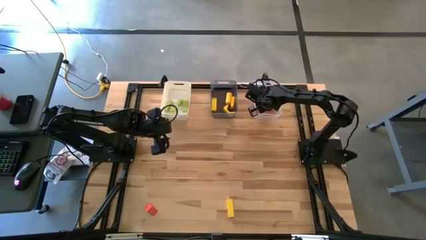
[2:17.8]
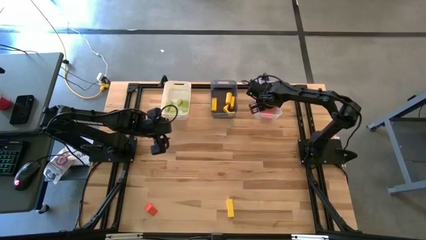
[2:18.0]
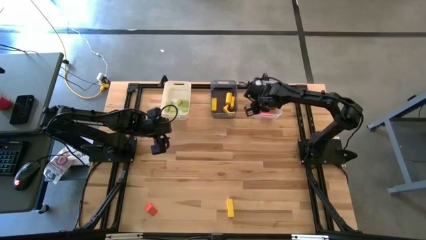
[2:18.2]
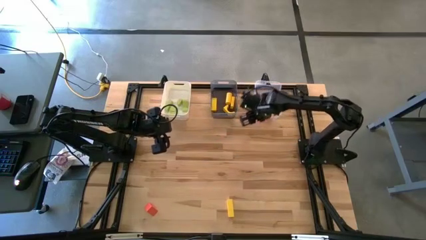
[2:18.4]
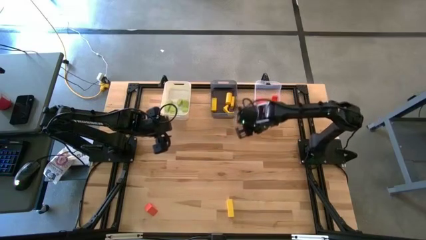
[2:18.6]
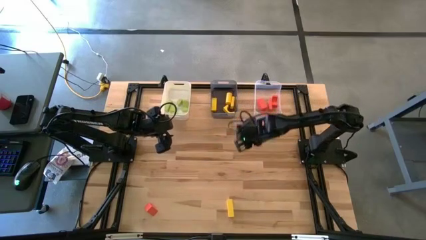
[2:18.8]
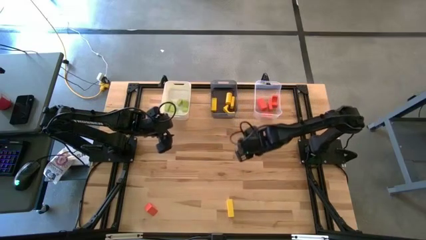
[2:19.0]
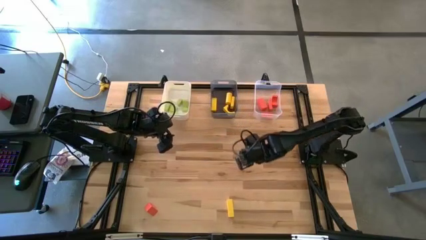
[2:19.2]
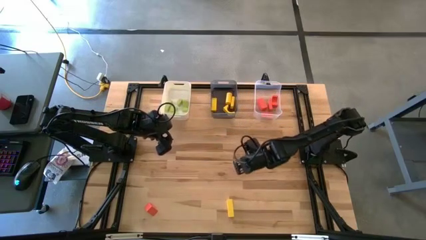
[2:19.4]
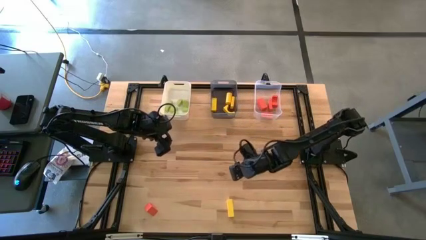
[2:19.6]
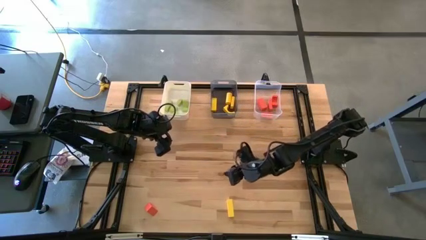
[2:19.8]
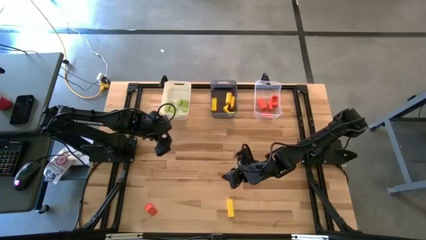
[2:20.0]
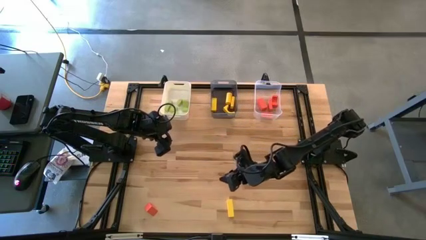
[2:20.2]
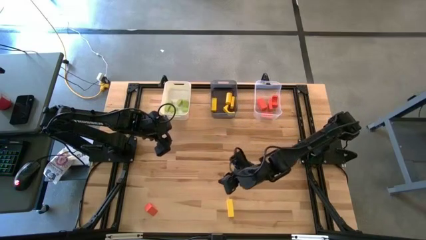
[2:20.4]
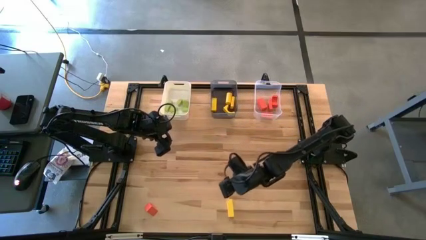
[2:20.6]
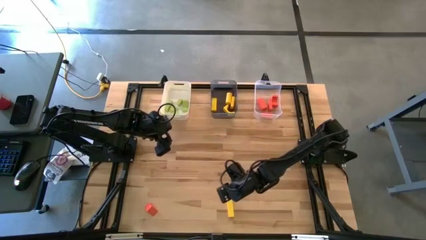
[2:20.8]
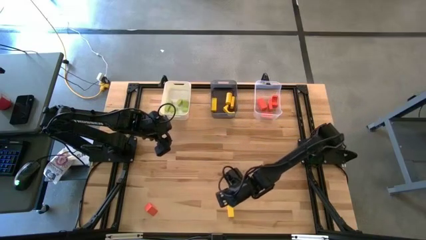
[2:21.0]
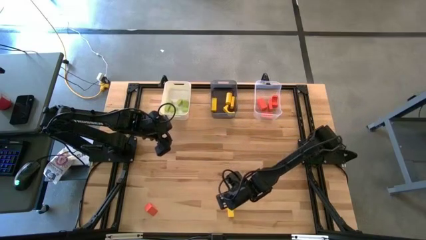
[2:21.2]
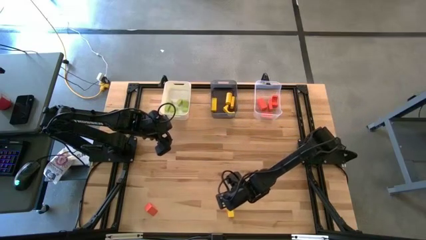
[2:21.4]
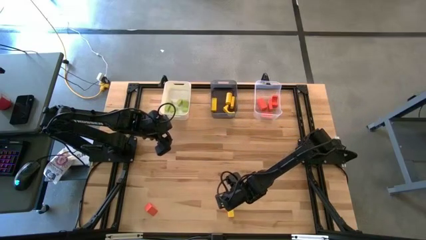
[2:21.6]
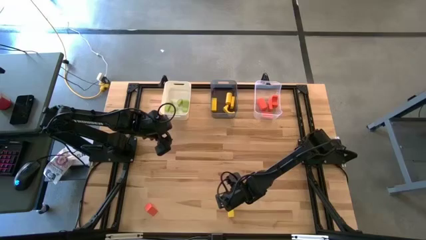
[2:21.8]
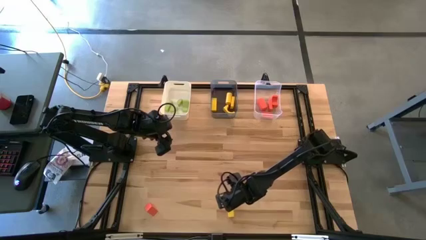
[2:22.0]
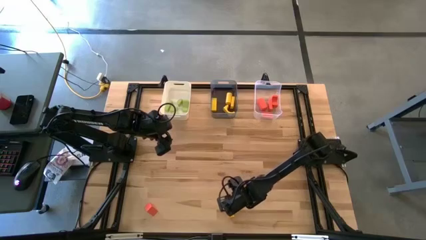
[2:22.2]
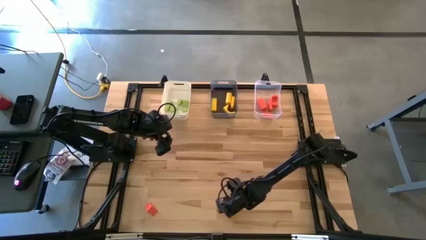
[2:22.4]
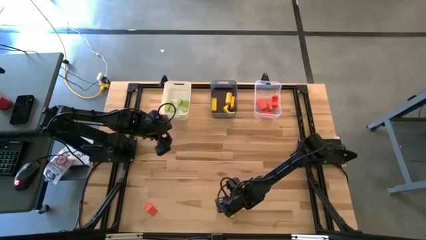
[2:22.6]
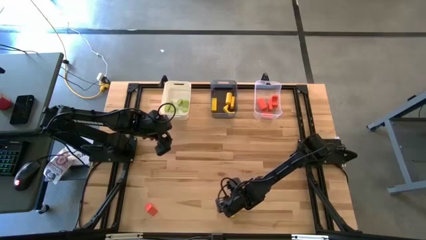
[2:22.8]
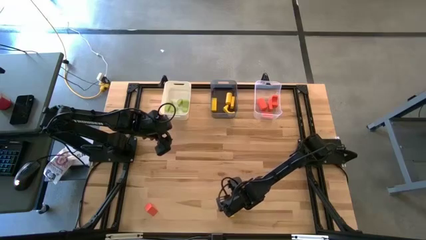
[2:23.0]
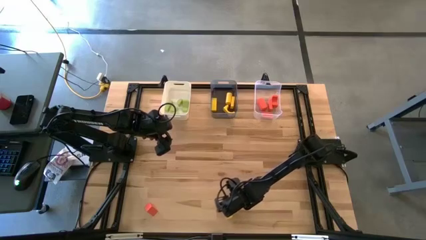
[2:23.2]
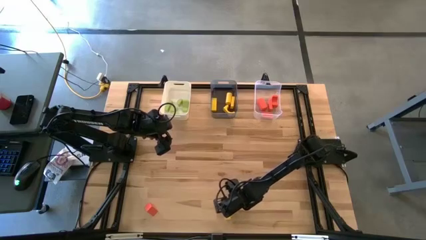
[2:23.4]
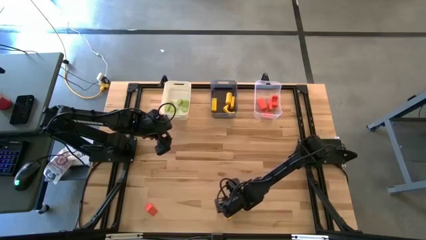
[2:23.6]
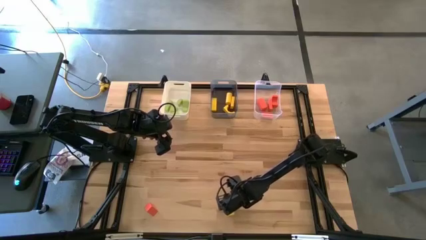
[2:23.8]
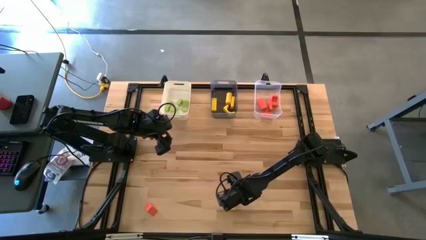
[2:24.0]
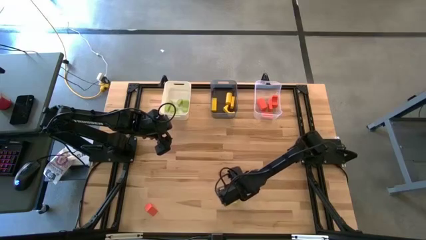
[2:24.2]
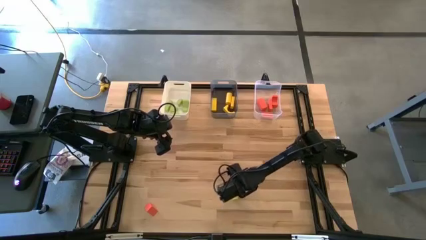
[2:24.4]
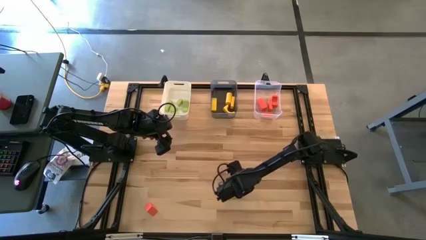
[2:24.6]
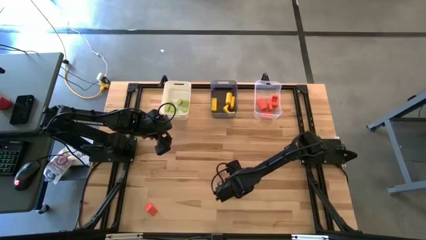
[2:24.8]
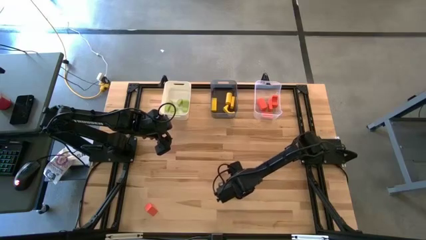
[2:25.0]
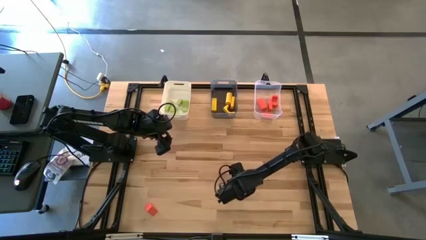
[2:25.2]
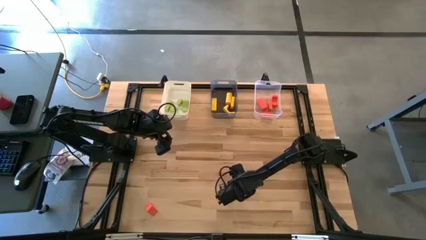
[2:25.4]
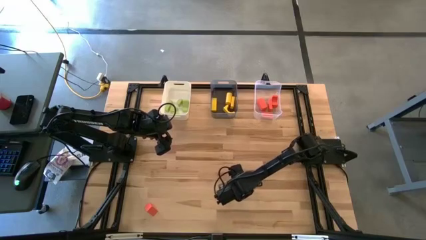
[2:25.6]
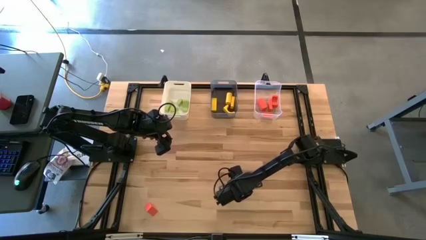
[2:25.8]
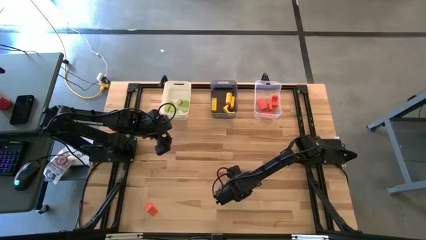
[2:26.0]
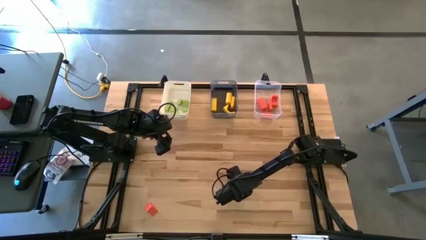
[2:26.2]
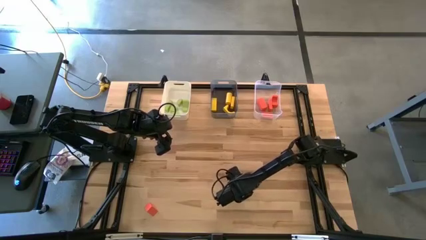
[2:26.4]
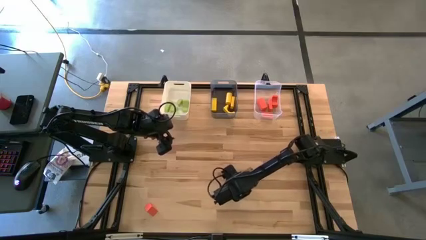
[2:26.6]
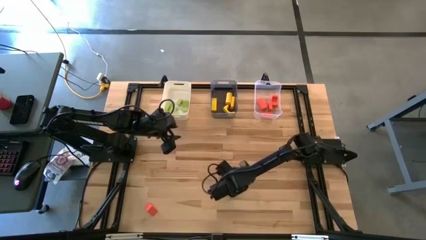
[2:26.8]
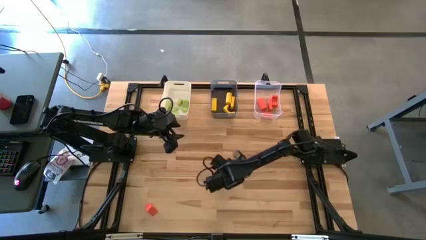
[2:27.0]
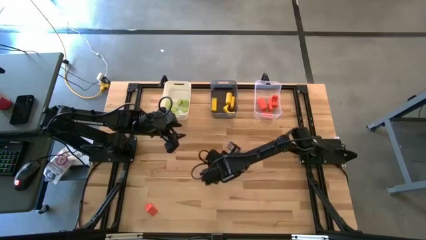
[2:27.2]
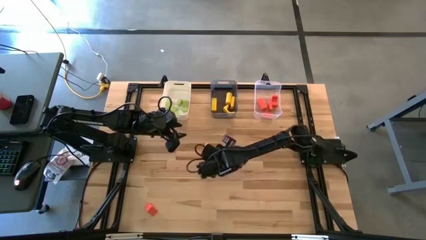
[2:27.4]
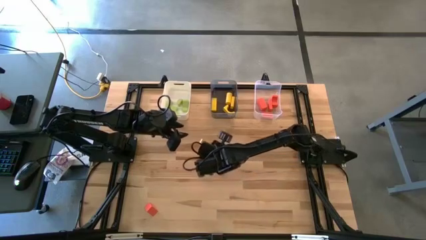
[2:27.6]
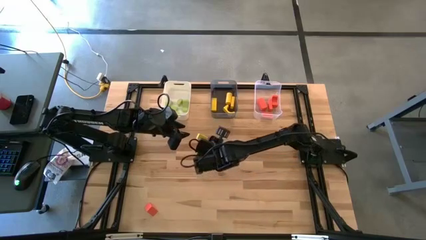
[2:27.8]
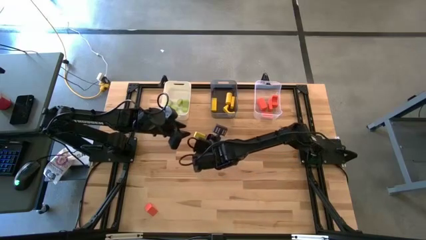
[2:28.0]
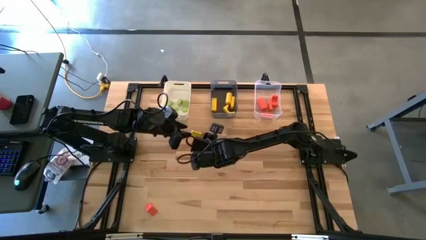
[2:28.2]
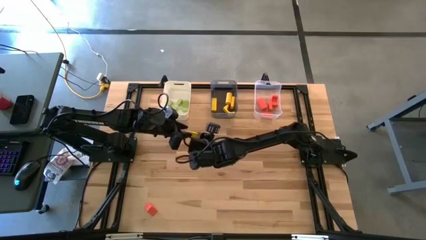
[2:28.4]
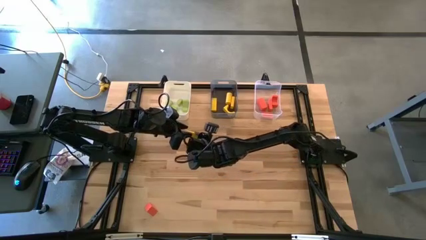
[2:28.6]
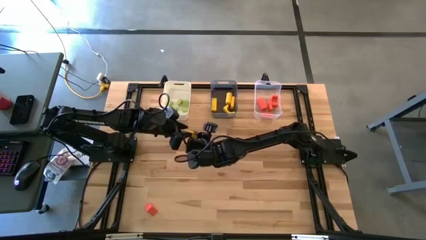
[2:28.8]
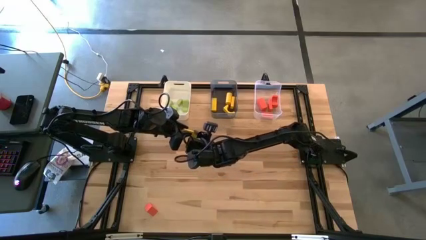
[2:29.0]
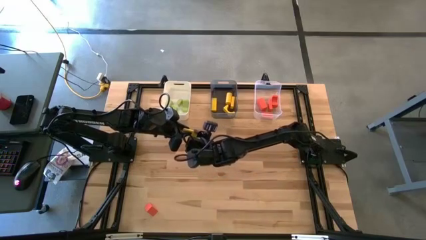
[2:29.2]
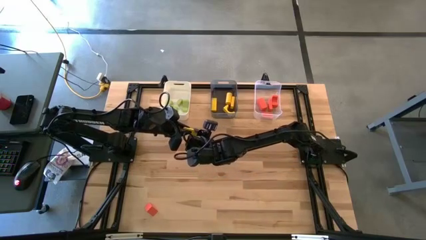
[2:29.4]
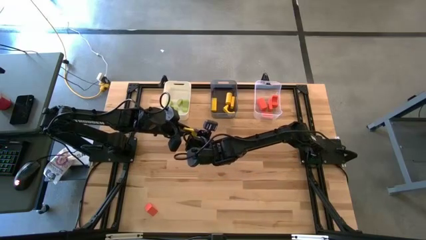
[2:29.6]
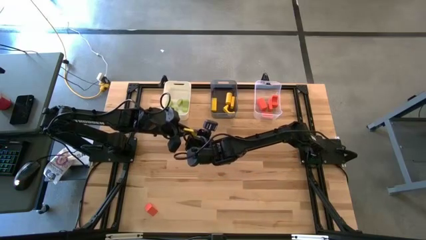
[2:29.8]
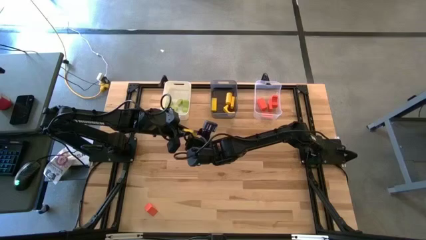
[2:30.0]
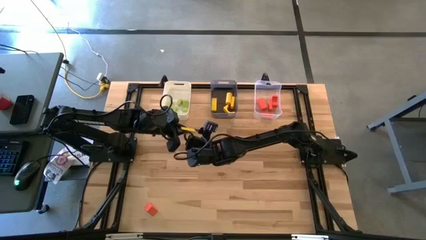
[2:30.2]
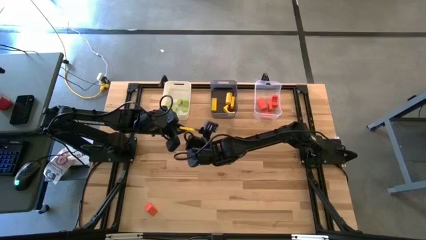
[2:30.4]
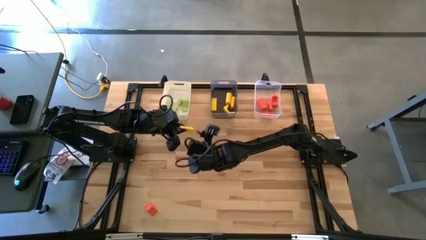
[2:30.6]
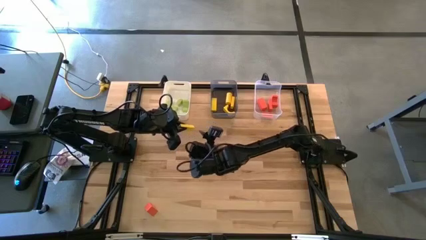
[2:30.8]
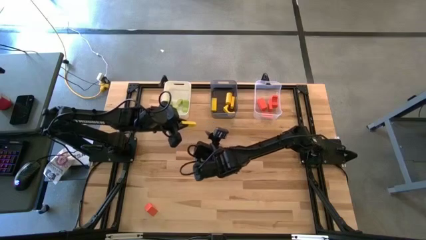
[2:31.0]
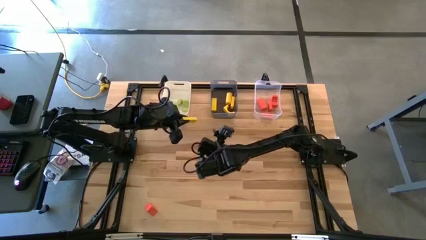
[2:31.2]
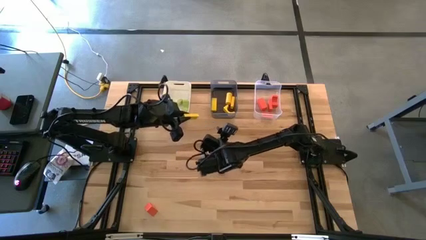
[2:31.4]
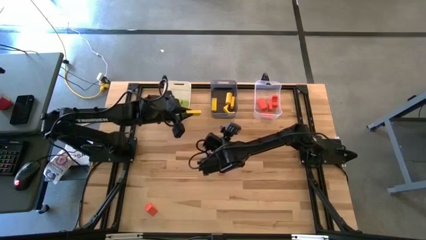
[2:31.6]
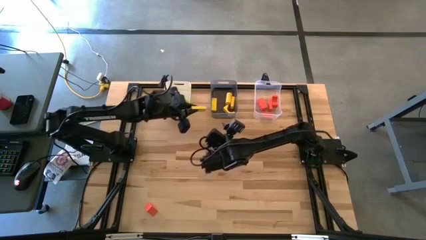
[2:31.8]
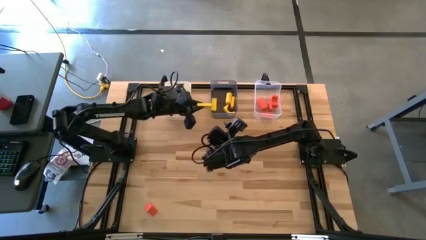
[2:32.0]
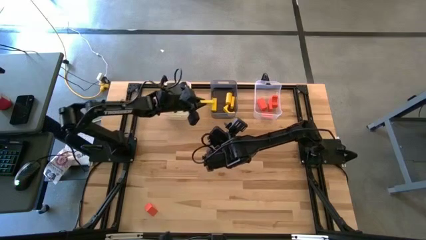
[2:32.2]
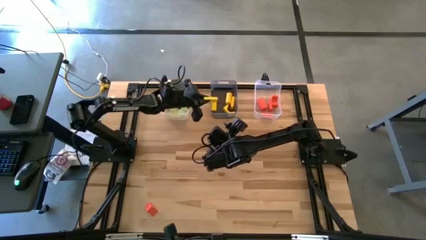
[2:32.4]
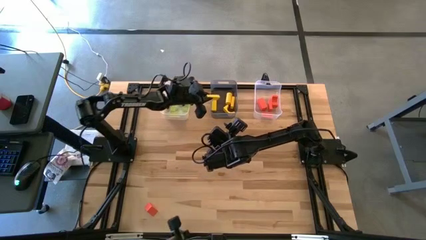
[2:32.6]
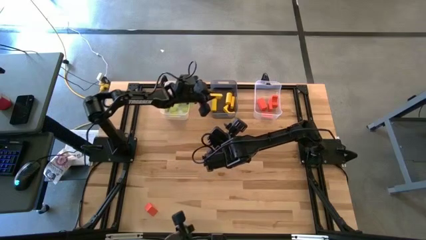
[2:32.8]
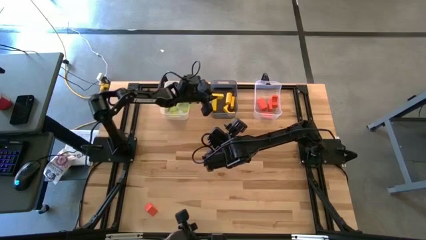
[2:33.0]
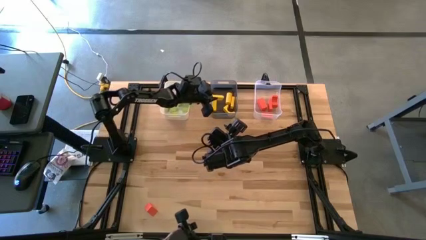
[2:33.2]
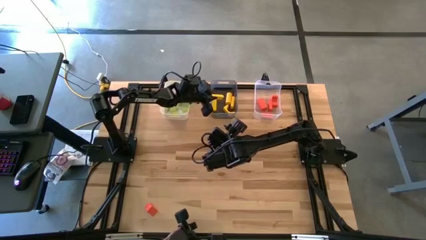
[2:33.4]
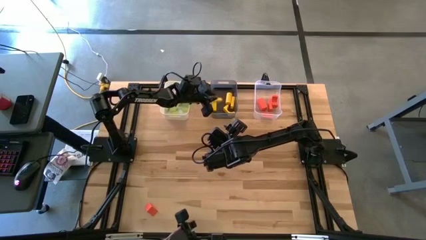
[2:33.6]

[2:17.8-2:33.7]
Task: Sort & place blocks by color
Put the yellow block into the black bin
